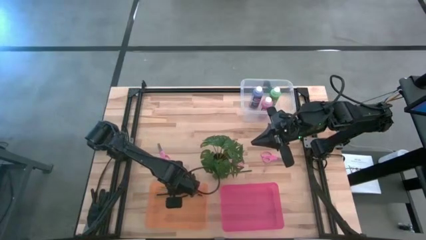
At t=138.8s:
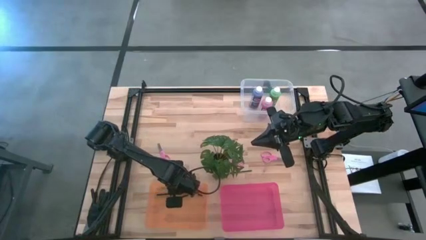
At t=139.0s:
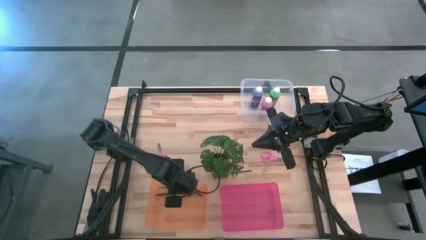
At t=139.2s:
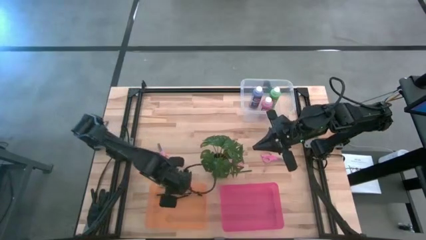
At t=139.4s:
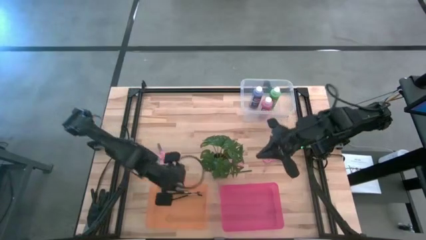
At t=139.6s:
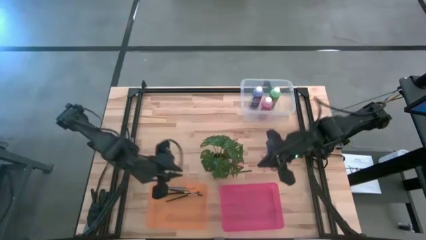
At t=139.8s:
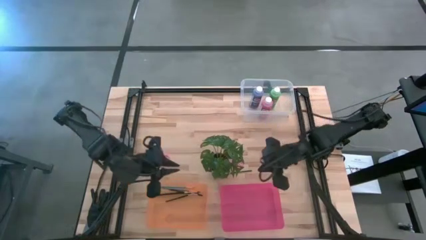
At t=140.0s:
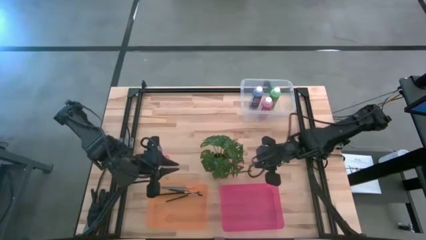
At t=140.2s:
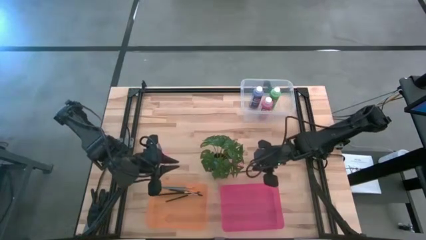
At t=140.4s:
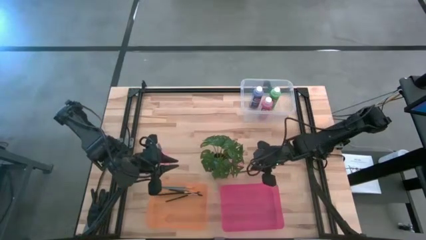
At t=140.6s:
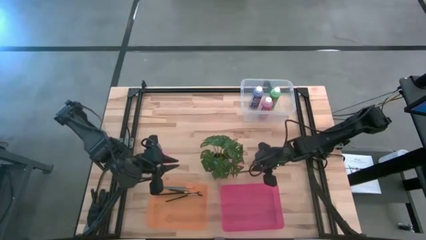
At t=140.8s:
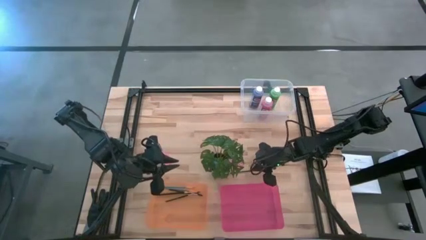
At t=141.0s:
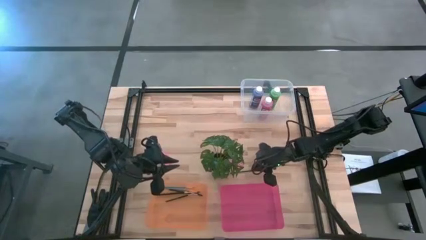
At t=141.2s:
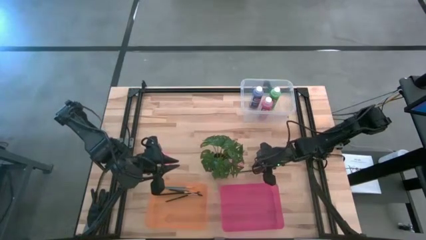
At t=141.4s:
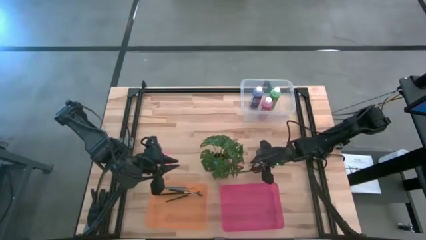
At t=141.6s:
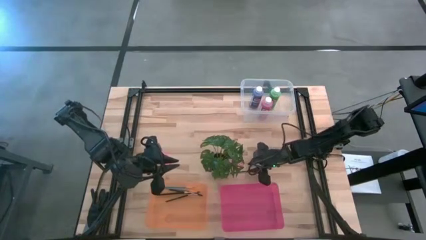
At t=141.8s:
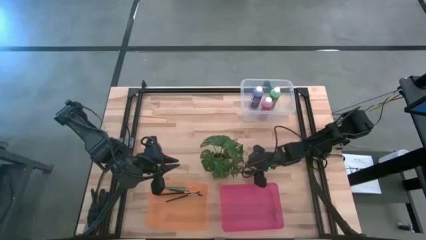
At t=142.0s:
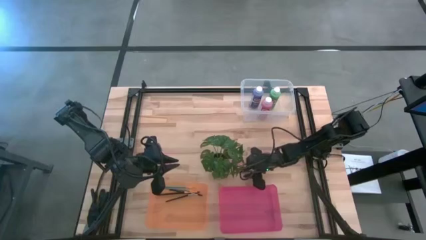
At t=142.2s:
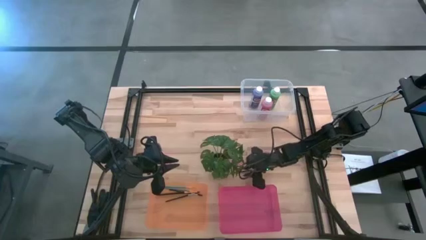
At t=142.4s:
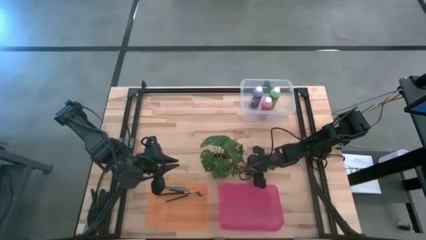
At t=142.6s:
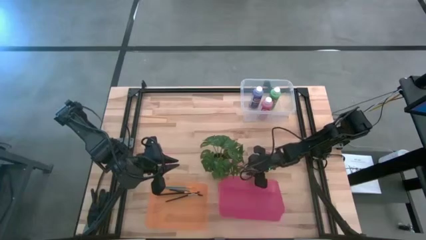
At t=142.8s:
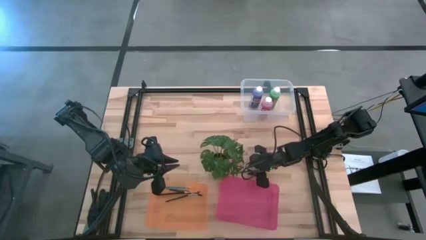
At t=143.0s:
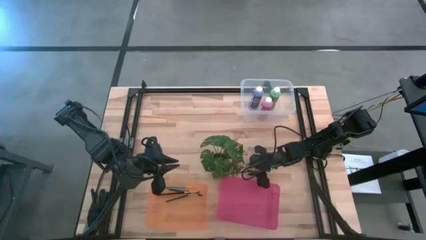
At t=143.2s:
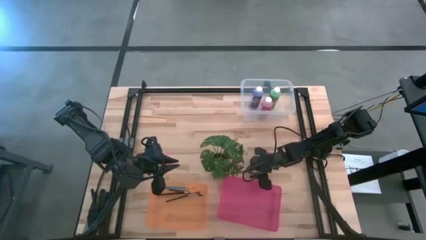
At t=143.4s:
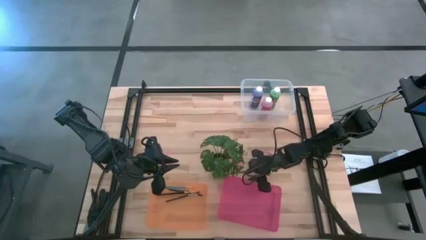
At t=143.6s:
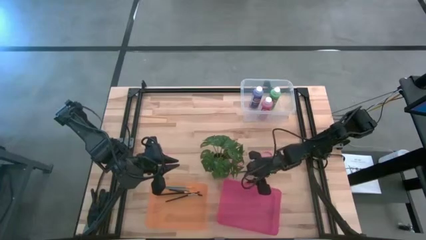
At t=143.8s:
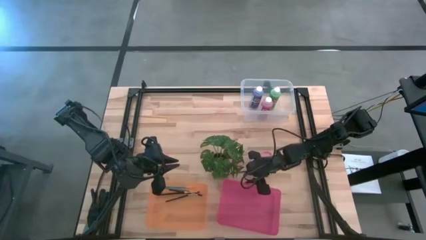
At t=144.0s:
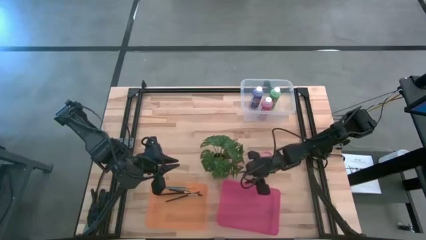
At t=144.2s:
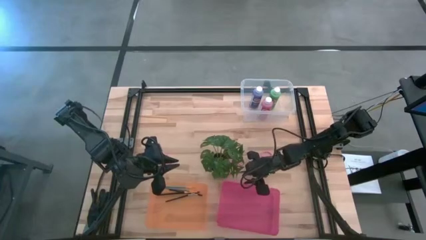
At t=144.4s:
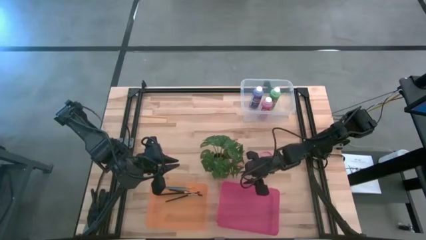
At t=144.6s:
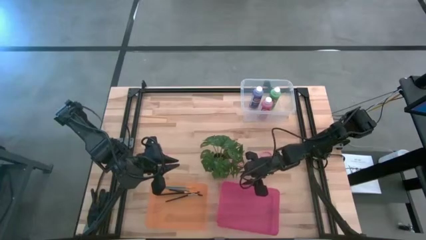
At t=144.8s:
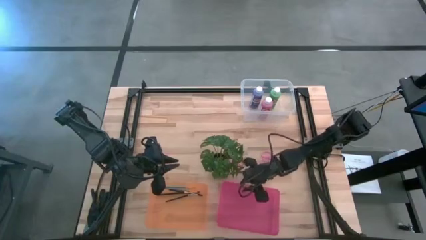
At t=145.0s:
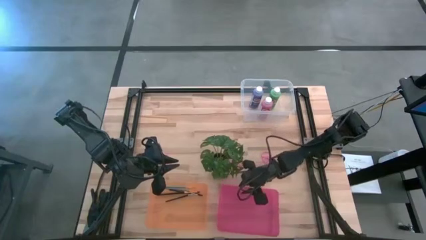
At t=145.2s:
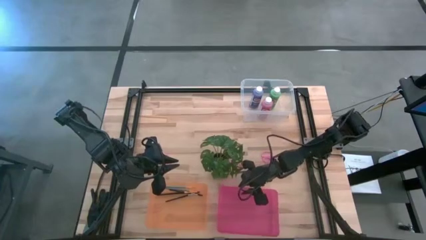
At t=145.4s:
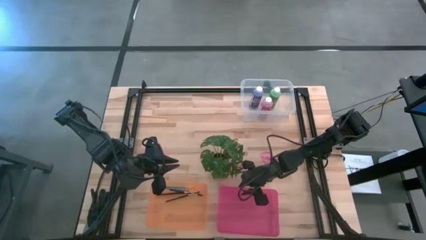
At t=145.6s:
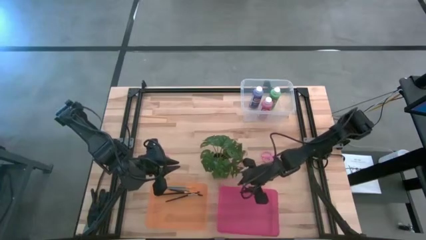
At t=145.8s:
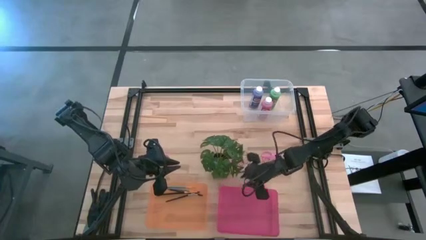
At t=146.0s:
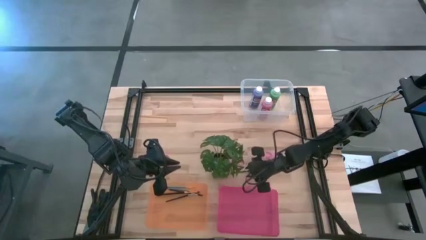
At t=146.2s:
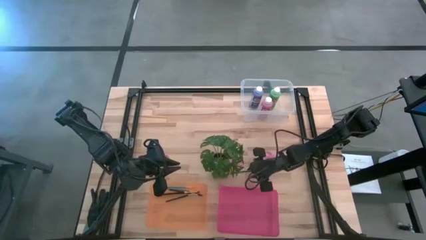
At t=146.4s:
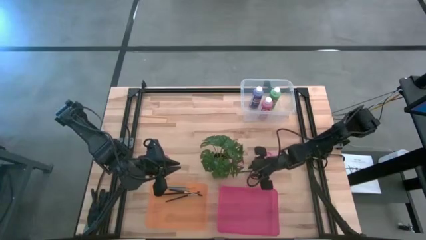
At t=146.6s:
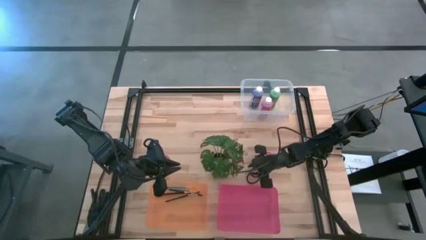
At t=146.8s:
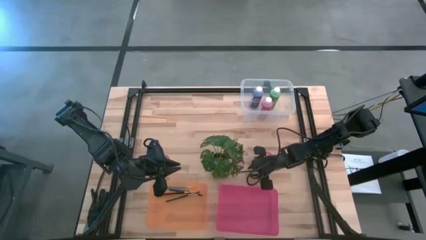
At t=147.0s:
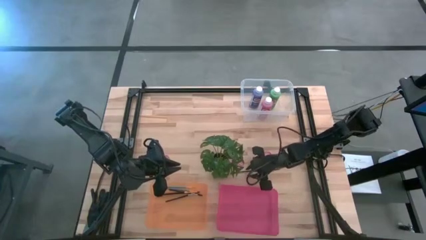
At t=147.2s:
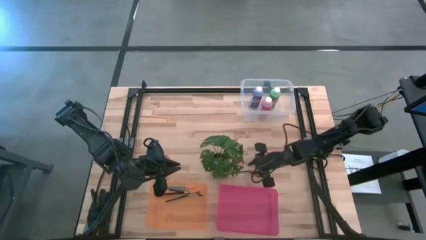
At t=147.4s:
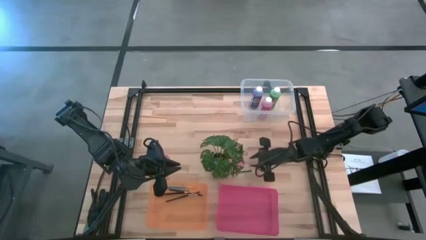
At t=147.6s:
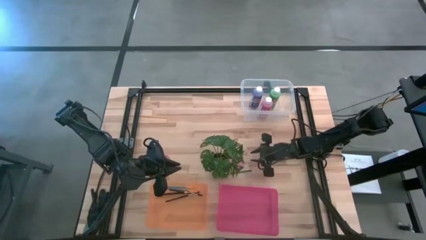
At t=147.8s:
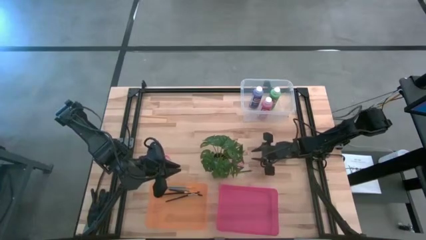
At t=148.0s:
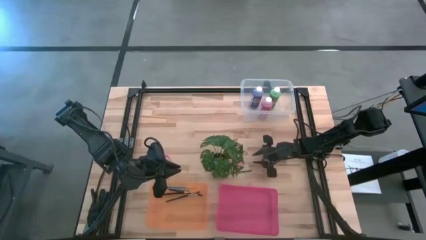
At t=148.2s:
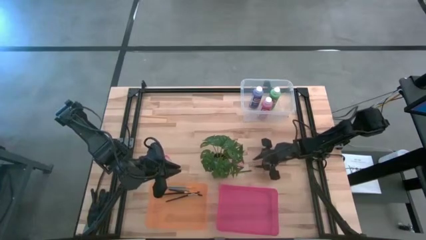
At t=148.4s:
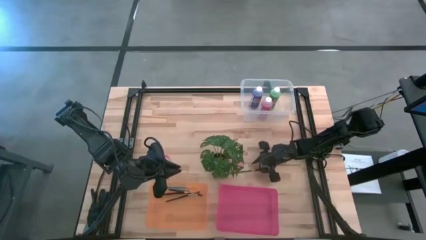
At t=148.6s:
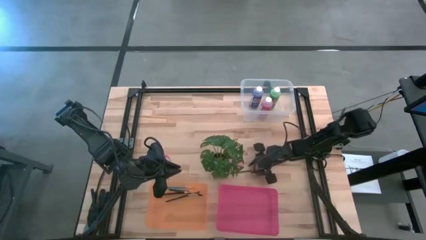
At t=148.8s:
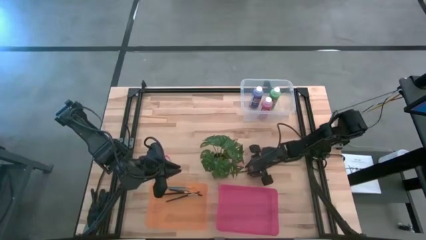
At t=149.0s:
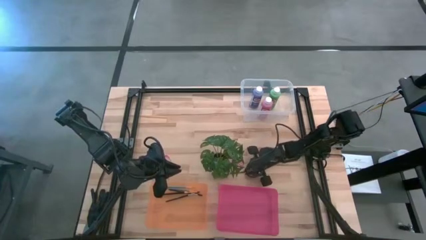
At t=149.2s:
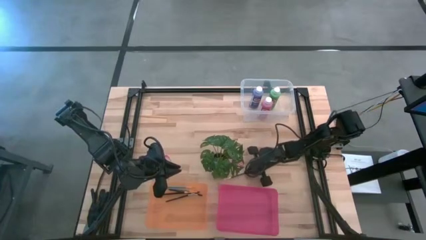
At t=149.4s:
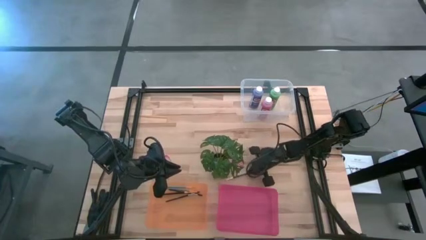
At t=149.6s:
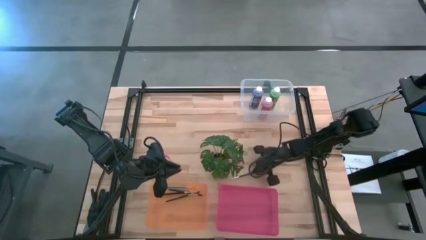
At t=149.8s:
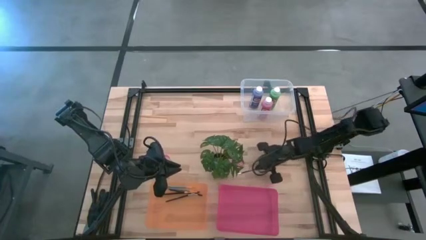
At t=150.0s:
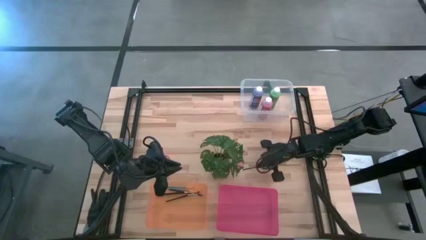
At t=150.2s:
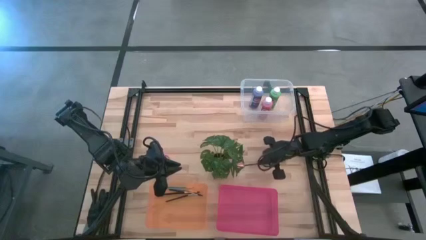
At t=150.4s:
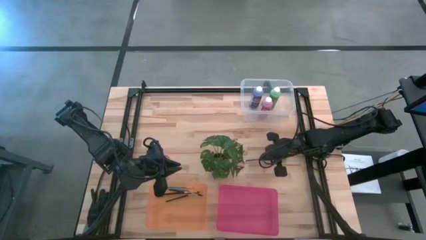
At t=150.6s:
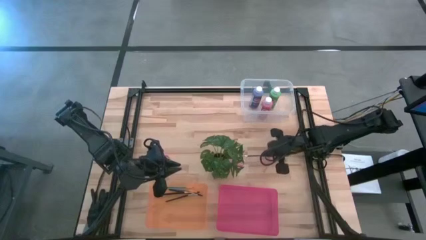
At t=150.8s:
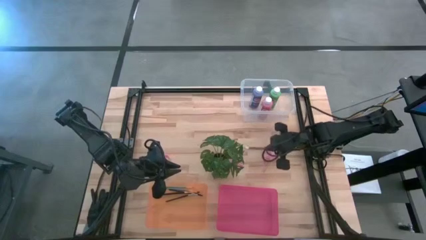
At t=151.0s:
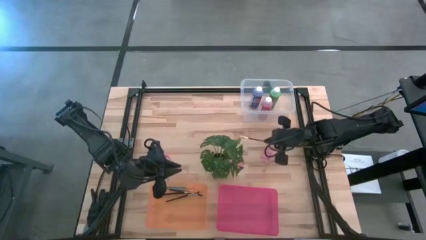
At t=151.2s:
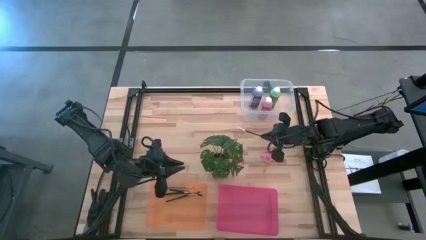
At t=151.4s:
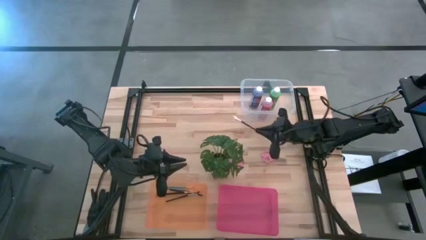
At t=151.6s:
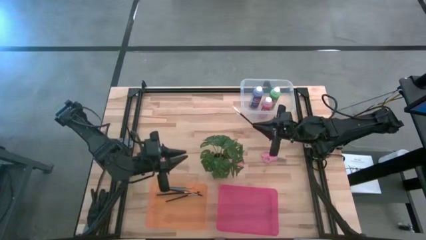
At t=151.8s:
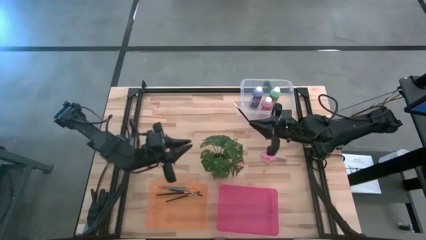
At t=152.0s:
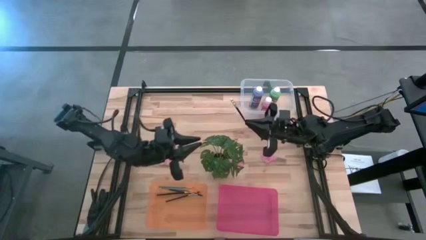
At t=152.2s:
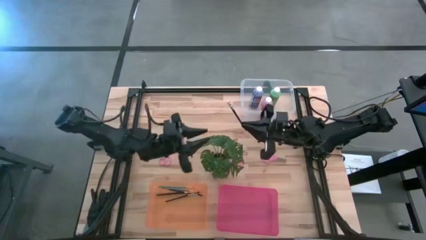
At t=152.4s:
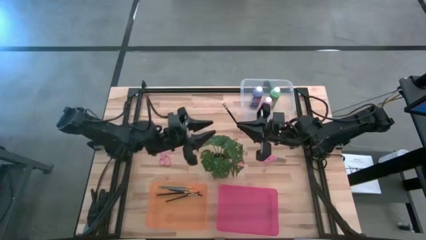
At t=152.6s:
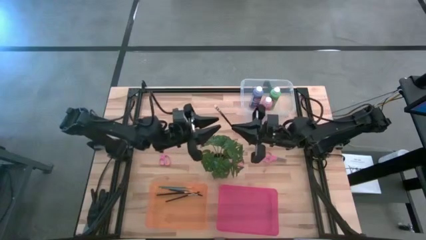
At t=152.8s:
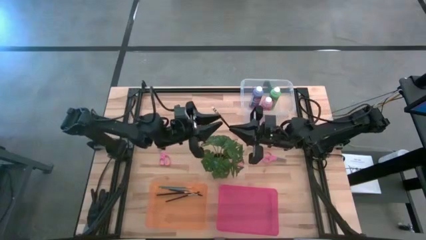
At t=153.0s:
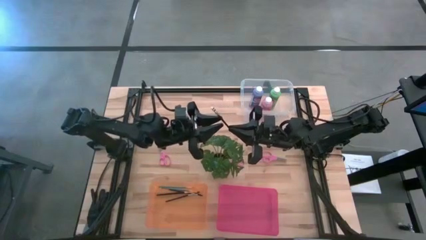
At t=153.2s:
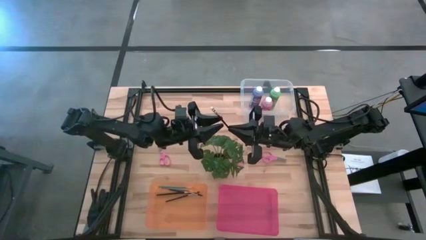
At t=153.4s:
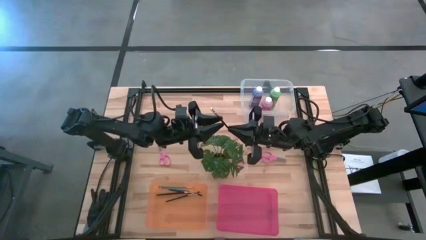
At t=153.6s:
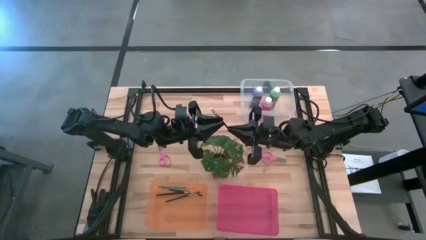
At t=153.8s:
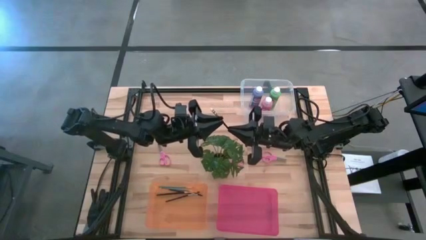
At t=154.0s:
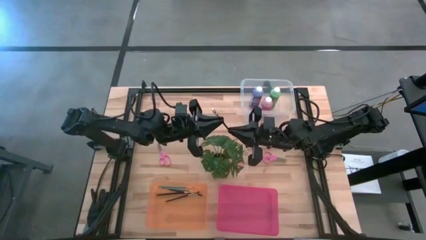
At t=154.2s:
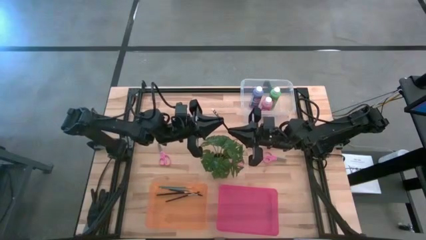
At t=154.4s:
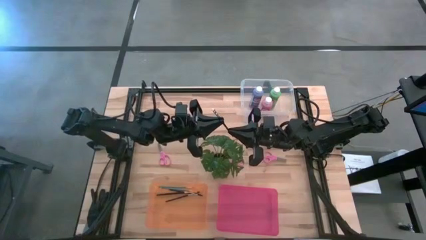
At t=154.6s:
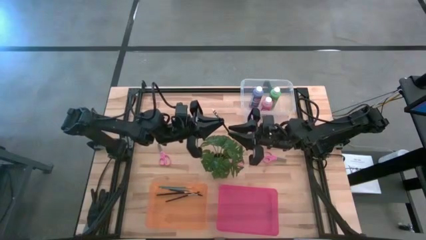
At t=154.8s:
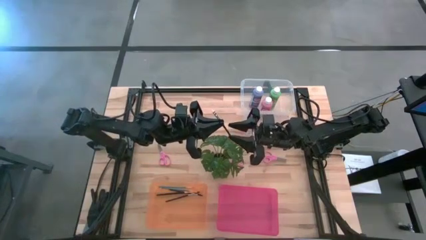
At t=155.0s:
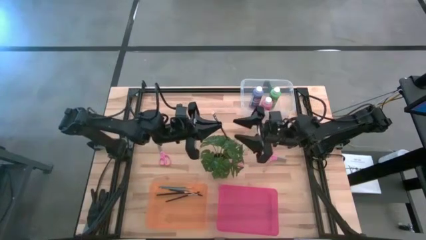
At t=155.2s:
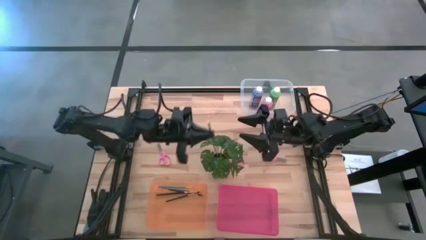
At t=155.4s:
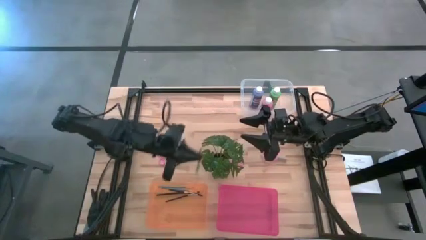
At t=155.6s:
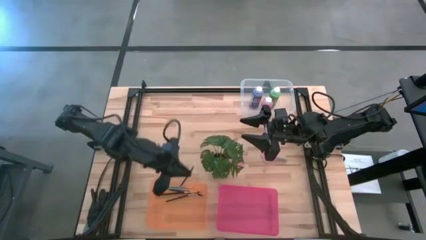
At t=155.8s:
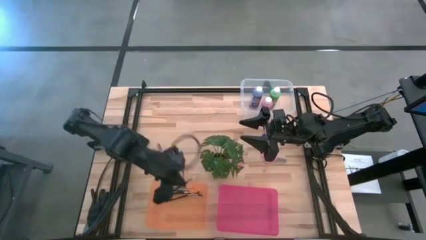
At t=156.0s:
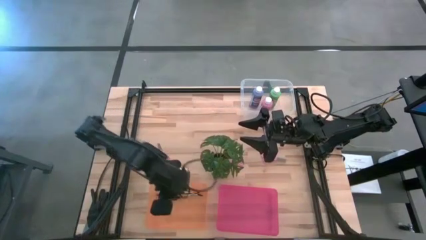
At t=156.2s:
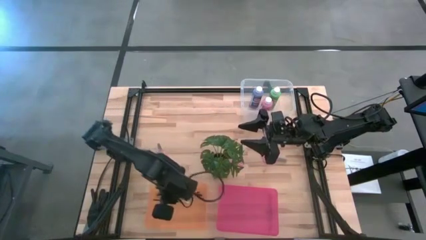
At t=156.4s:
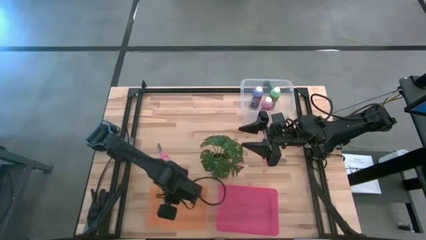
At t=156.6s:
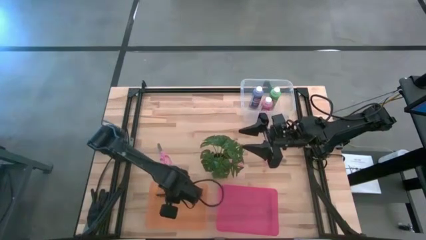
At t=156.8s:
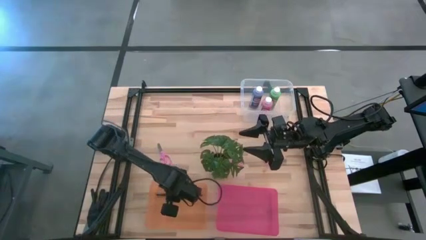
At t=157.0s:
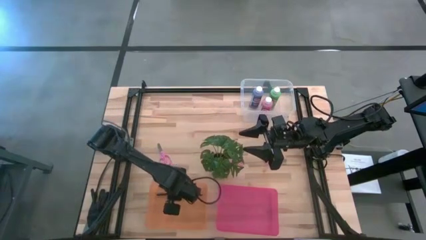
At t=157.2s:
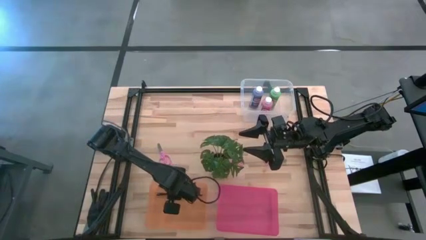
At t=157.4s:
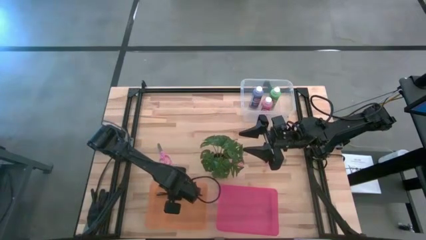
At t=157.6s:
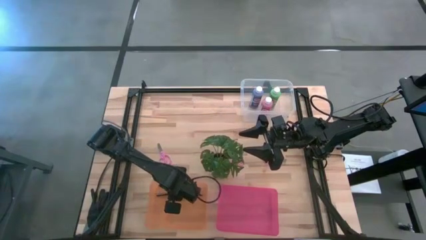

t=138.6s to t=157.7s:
Task: Pick & Place Paint Supplies
Put the black eyeshadow brush into the orange bin
